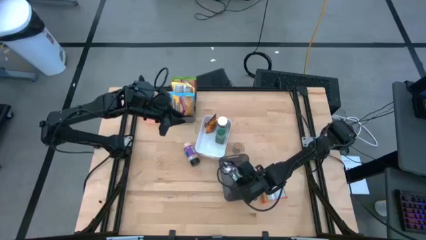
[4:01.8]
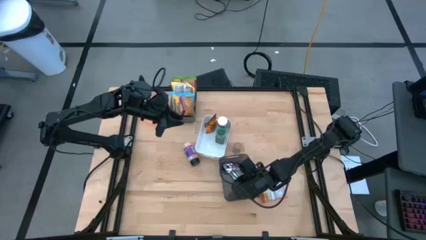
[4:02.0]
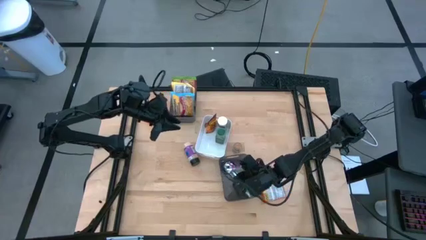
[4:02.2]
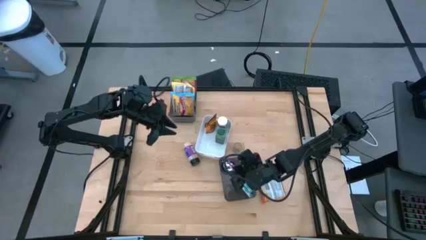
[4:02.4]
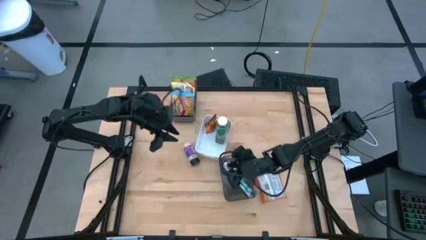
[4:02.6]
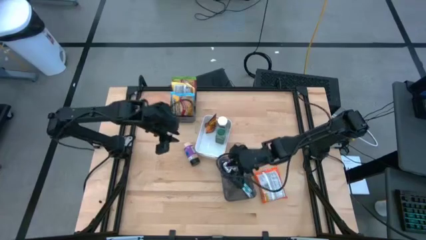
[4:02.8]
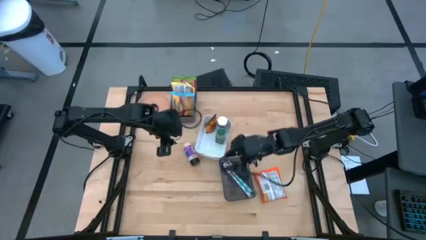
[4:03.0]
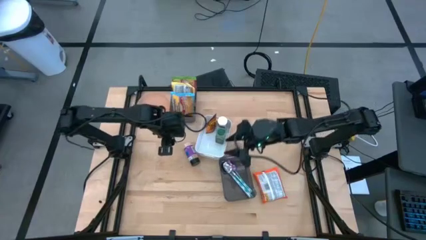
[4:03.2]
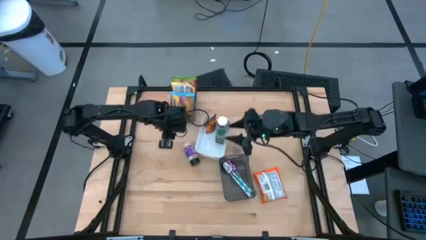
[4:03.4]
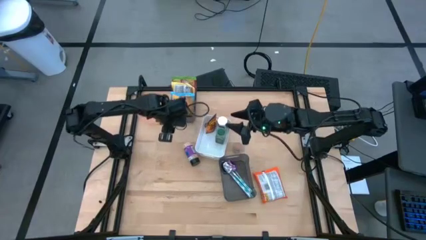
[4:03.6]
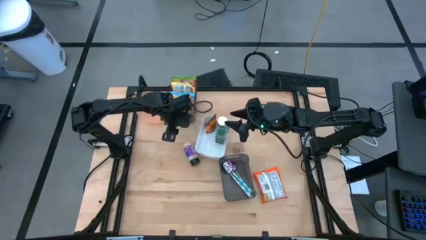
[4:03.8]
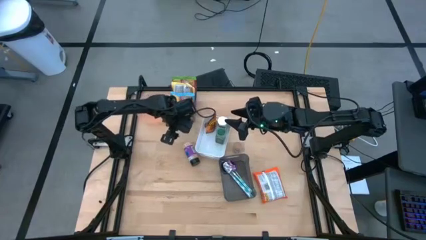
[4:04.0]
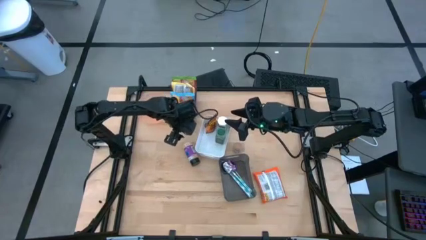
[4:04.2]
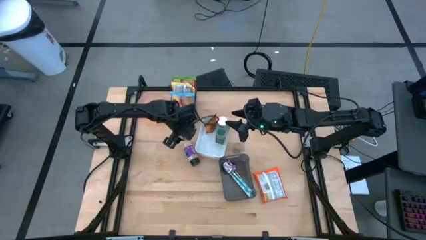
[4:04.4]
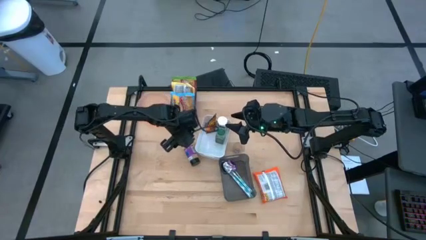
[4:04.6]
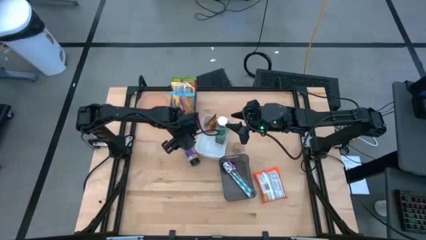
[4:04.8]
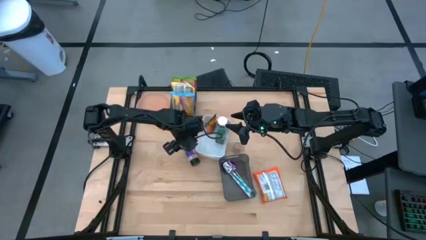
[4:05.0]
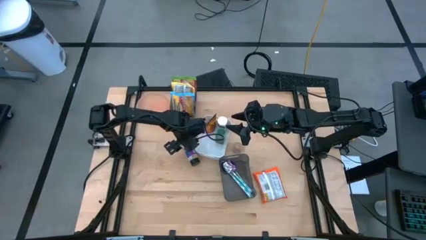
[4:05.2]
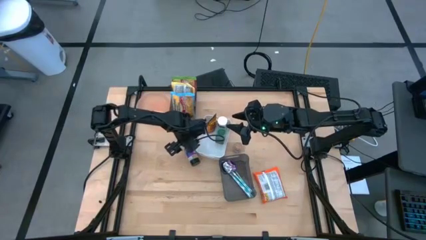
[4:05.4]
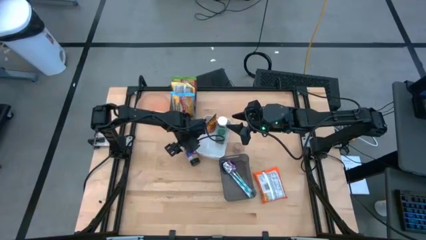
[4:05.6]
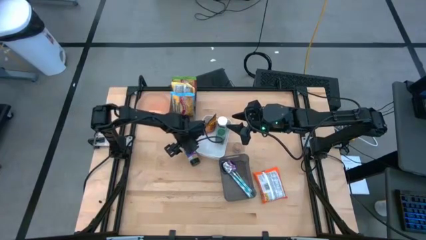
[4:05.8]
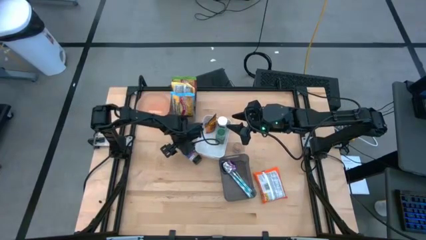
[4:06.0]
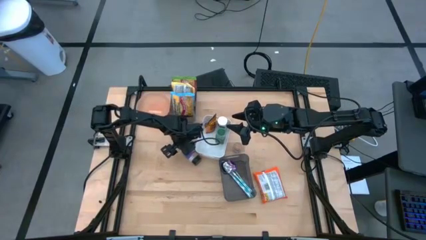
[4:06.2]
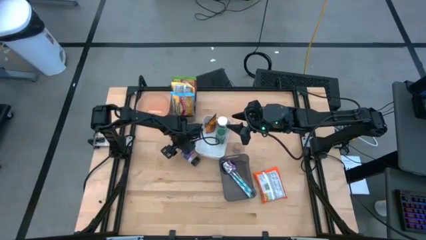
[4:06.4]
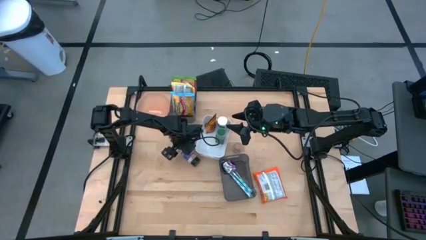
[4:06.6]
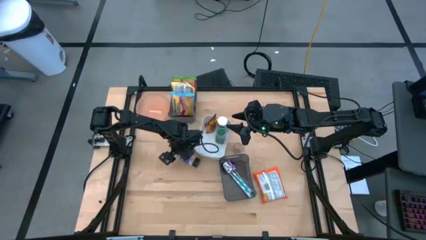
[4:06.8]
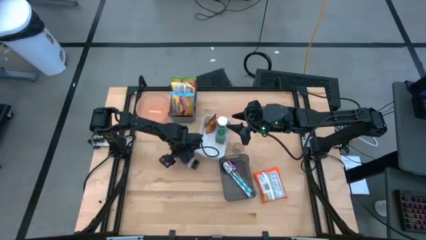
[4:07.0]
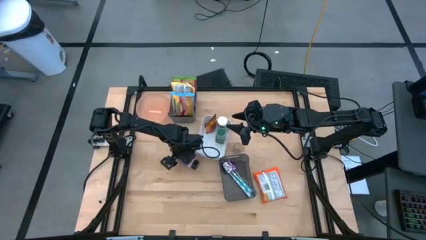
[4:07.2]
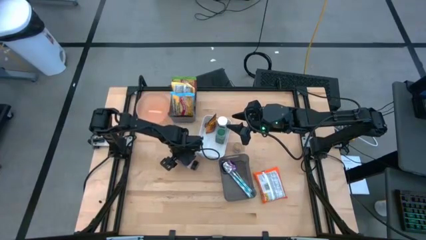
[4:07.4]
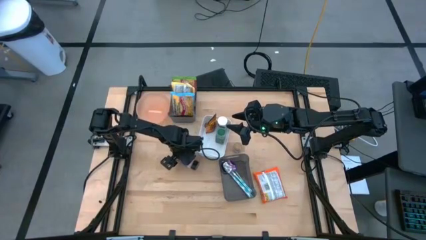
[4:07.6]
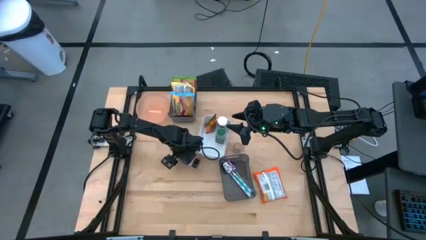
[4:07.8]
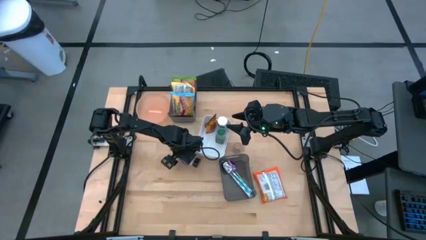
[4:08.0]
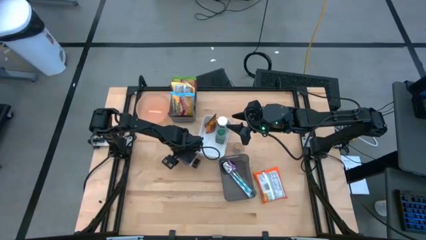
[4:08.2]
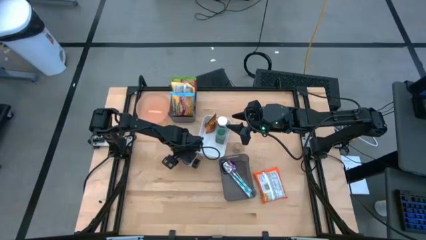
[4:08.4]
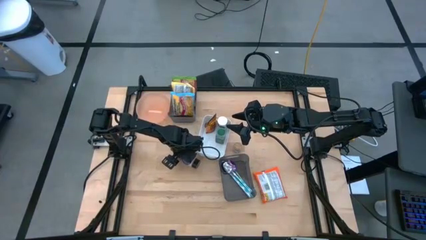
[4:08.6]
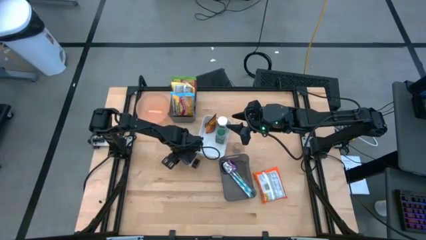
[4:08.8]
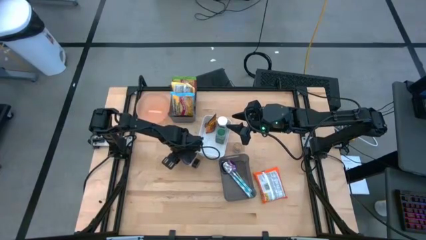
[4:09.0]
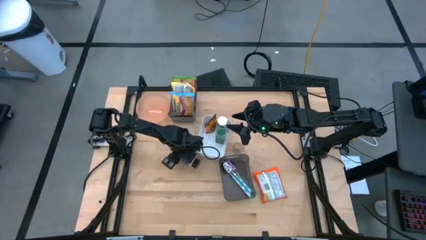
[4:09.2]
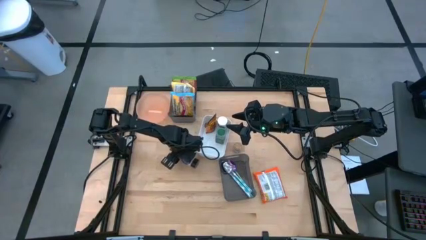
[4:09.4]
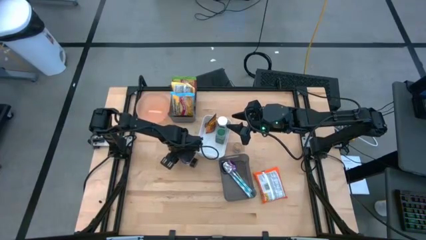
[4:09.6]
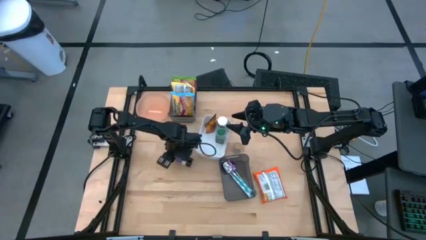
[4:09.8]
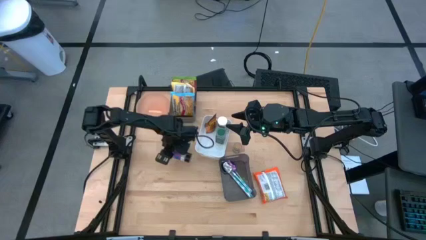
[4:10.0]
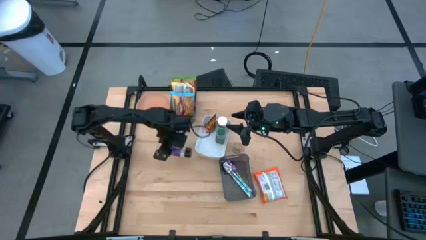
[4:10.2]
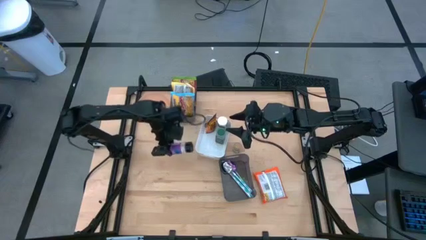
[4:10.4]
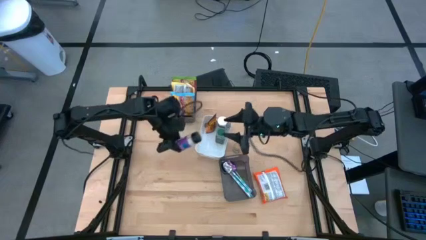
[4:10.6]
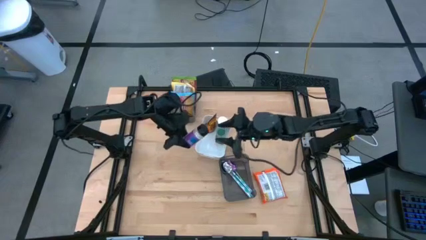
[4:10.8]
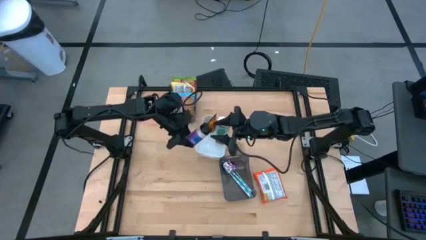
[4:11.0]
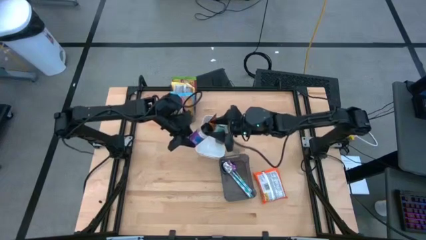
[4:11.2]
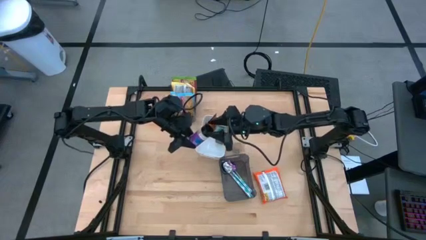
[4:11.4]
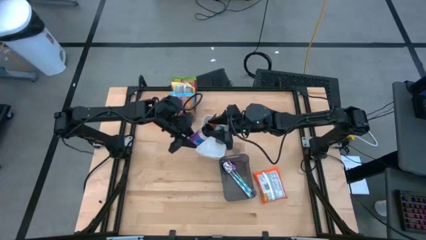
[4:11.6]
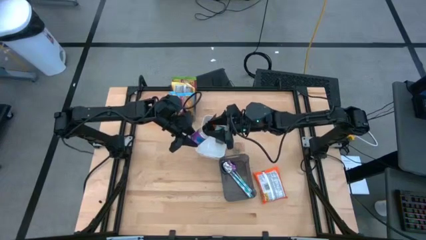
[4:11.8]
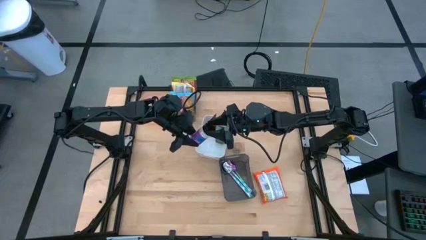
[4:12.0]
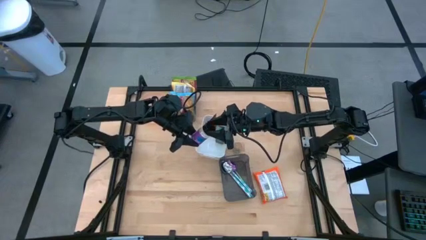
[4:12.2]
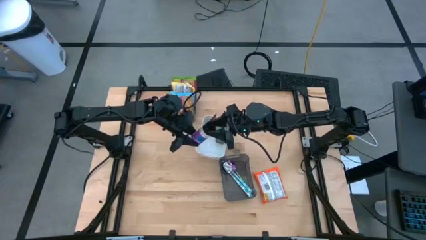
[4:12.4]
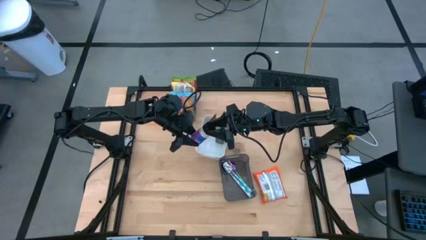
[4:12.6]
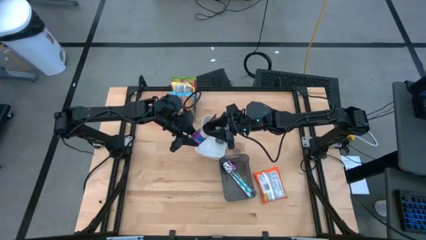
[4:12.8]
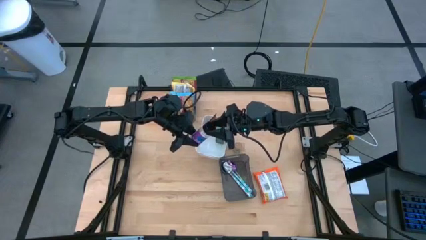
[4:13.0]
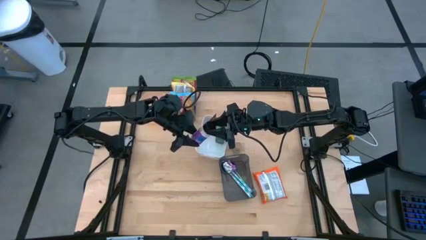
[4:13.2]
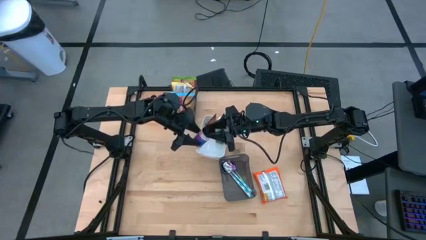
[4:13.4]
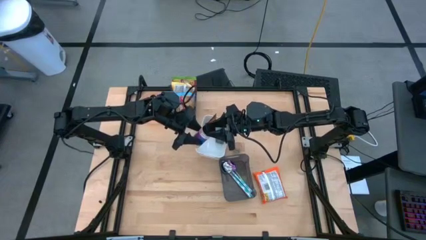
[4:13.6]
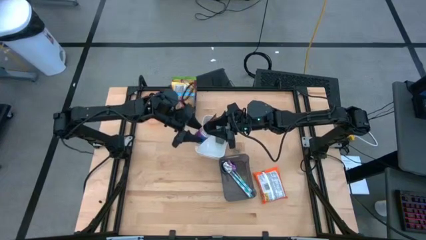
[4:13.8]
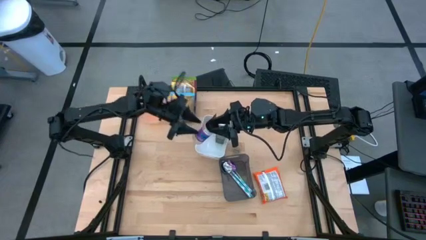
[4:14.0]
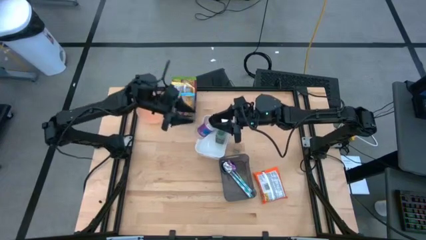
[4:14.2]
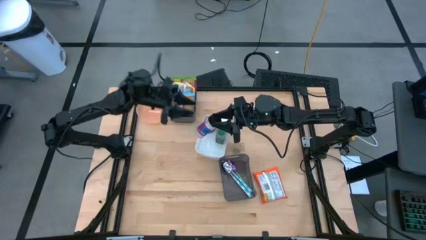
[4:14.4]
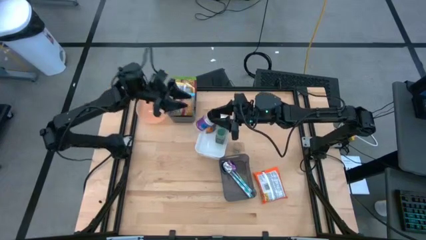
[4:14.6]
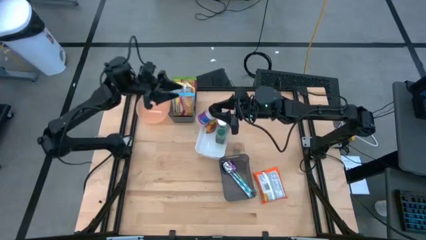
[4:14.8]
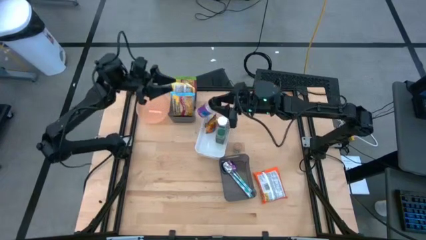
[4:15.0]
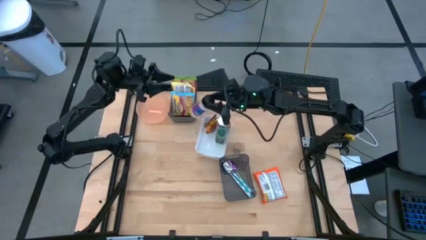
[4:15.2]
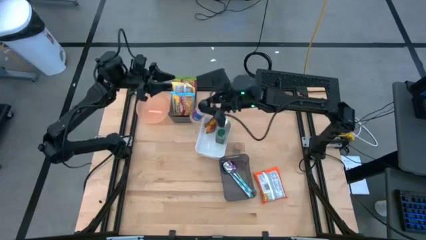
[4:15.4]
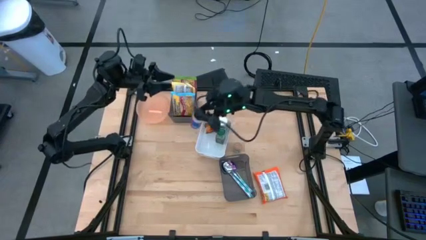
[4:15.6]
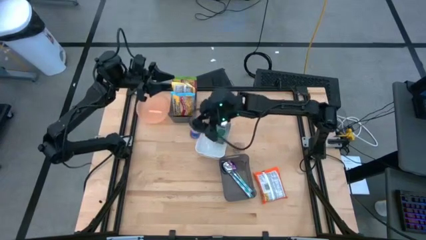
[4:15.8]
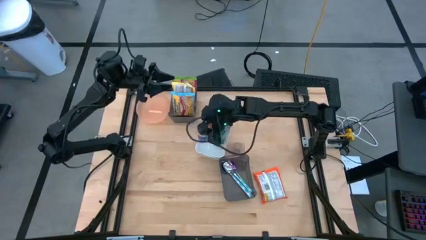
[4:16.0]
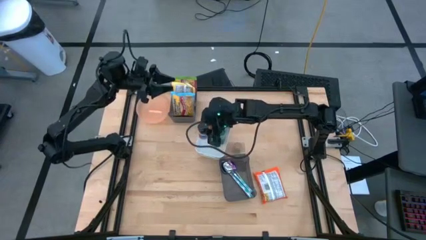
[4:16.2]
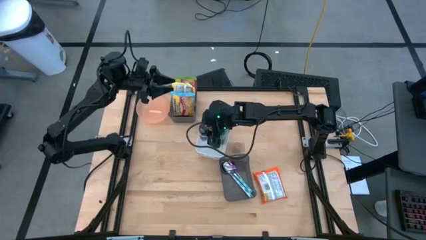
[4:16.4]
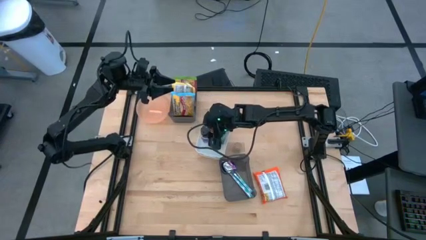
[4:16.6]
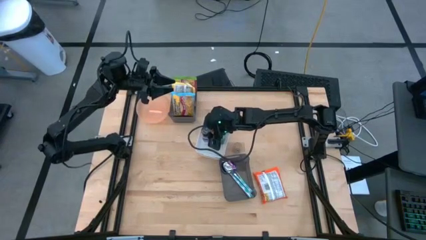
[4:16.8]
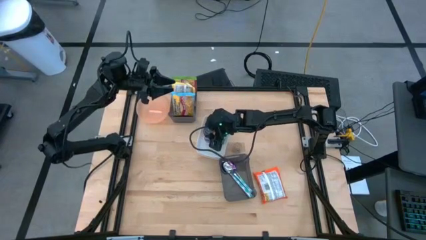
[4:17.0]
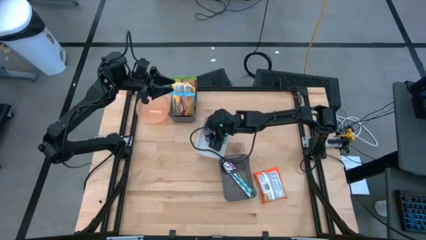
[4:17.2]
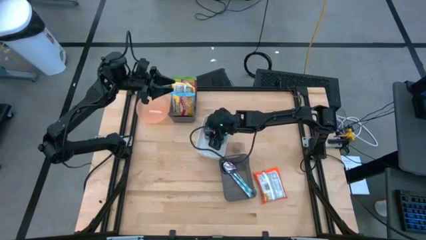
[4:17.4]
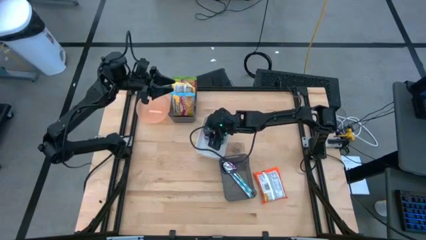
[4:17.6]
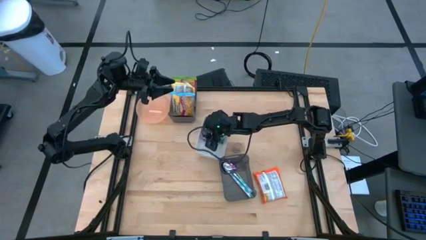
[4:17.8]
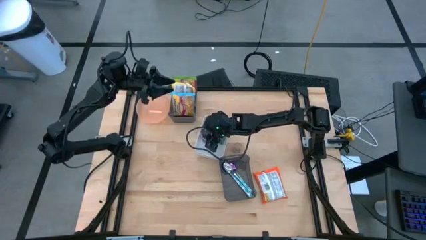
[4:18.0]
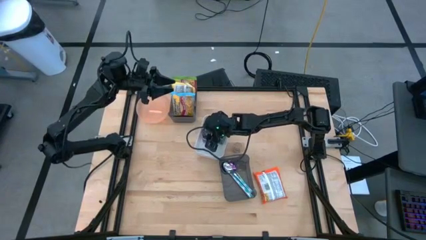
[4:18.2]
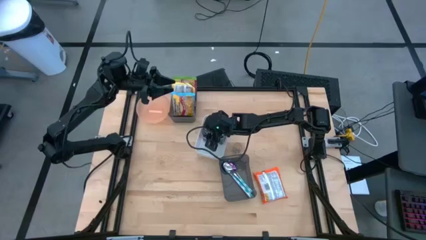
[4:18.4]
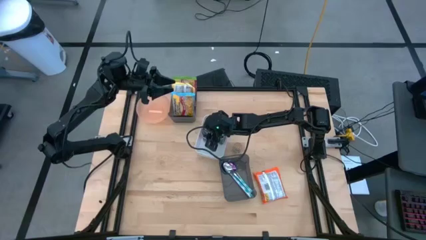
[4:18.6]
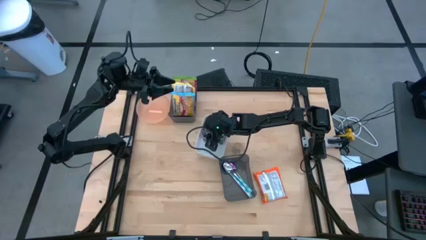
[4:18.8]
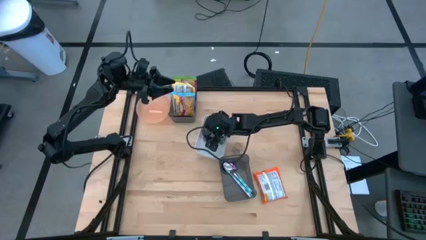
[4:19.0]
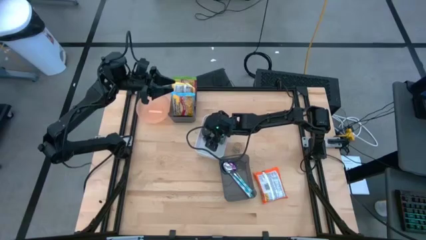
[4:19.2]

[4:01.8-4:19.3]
Task: Pick & Place Food Item
Put the purple seasoning bottle into the white bin
